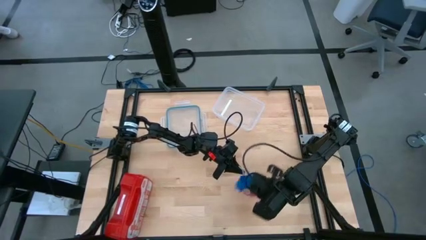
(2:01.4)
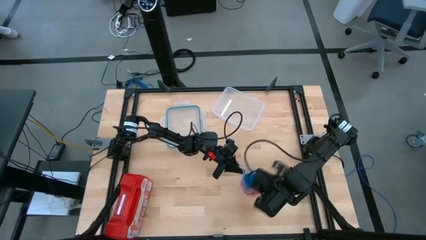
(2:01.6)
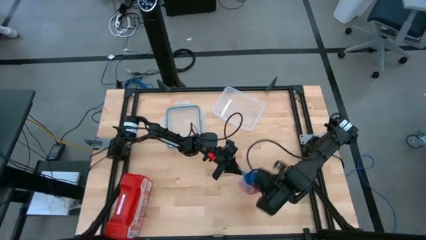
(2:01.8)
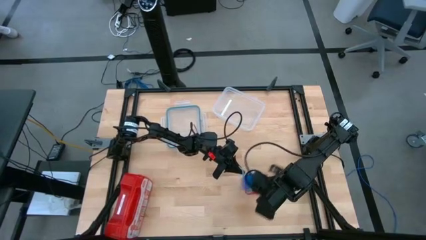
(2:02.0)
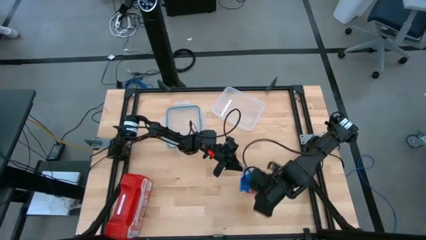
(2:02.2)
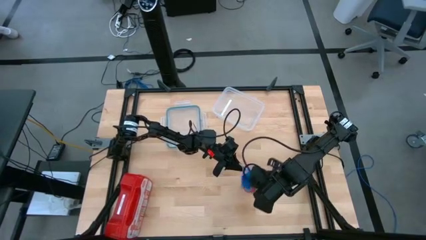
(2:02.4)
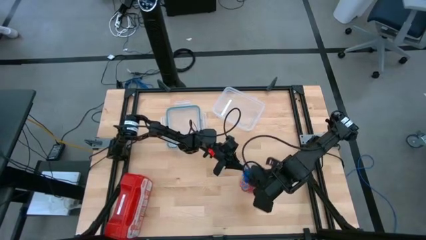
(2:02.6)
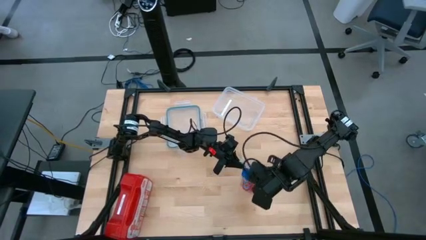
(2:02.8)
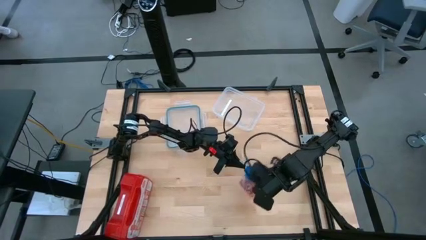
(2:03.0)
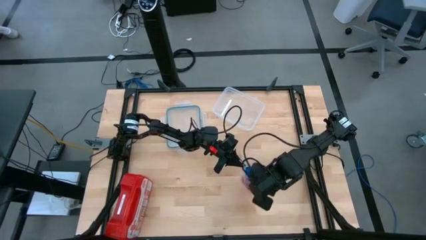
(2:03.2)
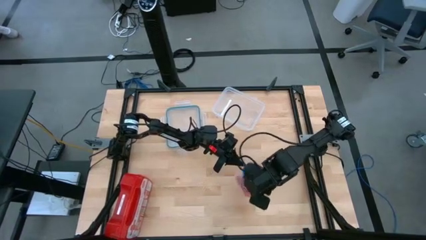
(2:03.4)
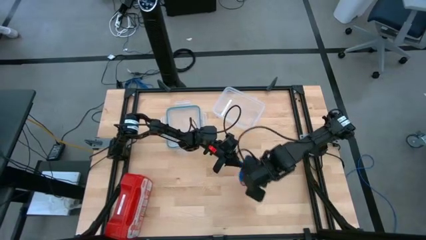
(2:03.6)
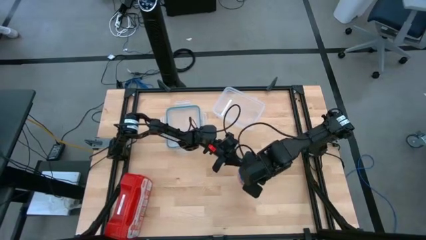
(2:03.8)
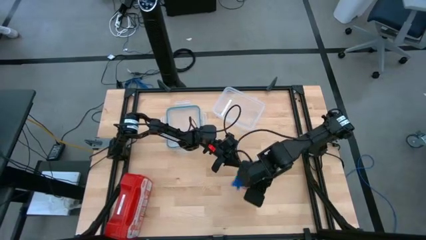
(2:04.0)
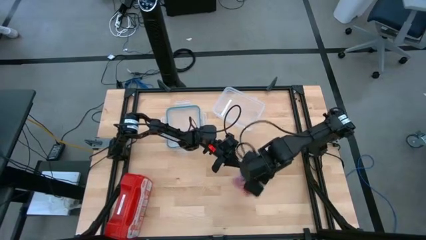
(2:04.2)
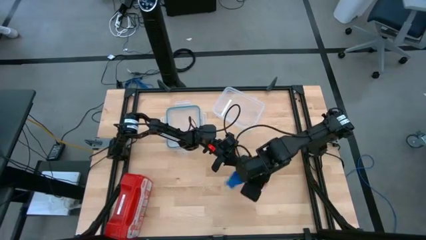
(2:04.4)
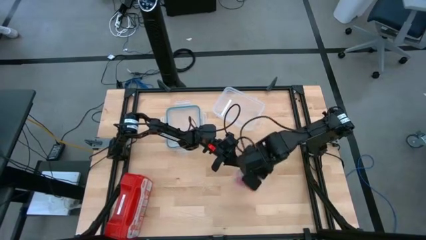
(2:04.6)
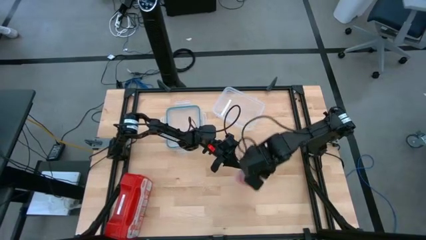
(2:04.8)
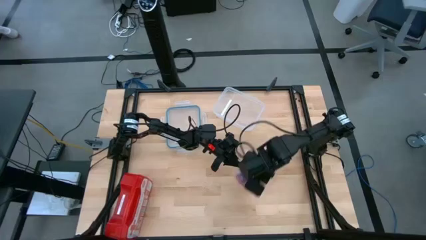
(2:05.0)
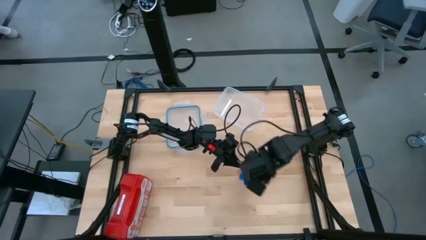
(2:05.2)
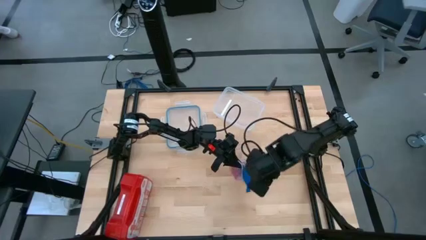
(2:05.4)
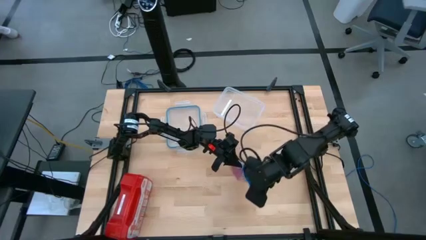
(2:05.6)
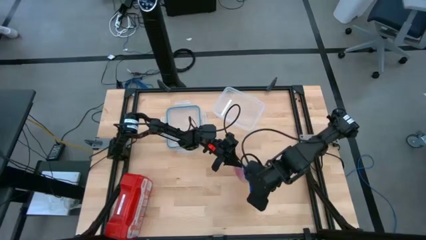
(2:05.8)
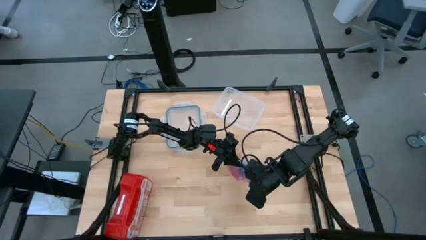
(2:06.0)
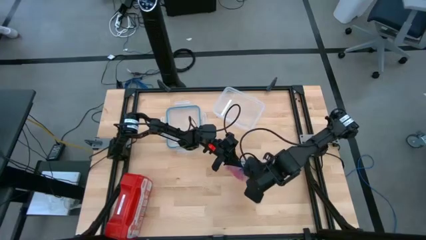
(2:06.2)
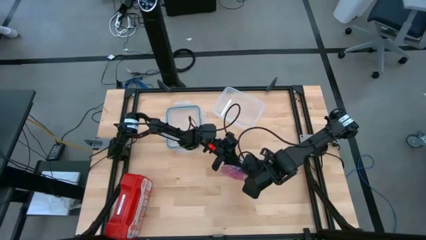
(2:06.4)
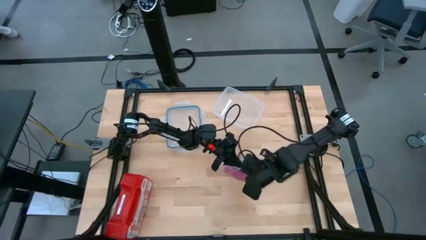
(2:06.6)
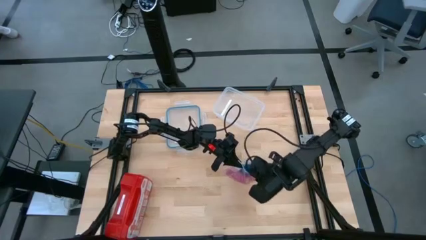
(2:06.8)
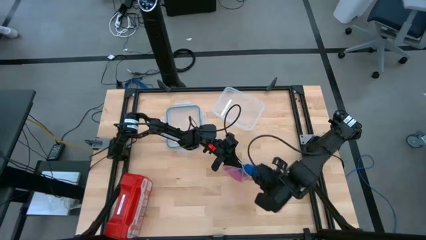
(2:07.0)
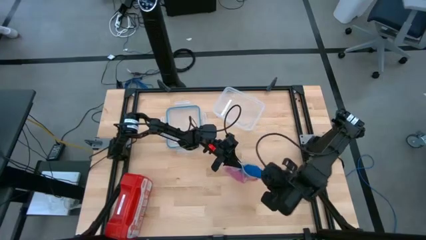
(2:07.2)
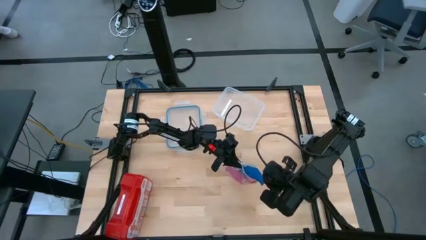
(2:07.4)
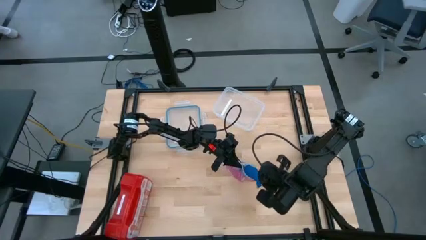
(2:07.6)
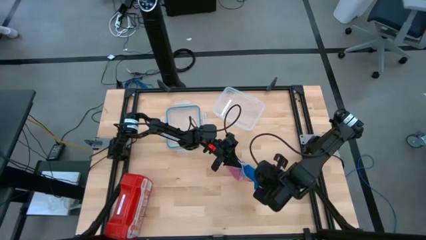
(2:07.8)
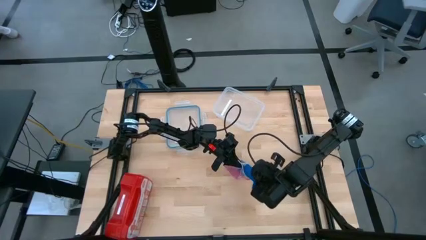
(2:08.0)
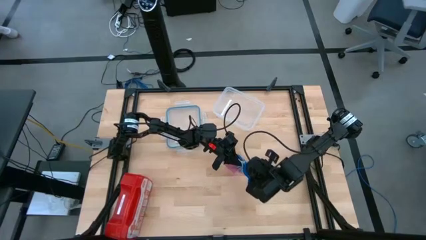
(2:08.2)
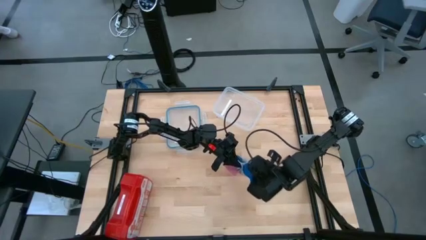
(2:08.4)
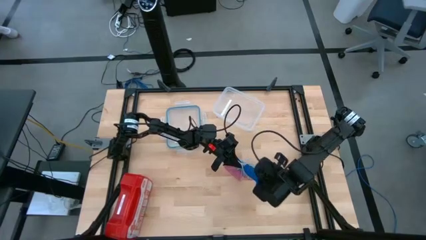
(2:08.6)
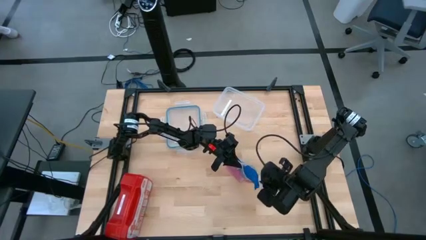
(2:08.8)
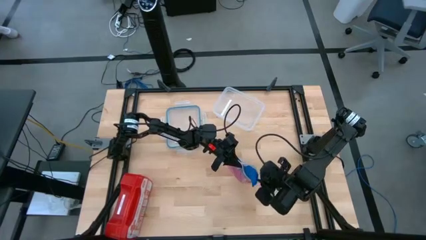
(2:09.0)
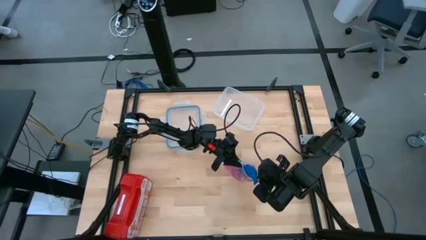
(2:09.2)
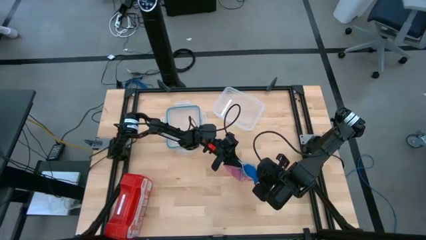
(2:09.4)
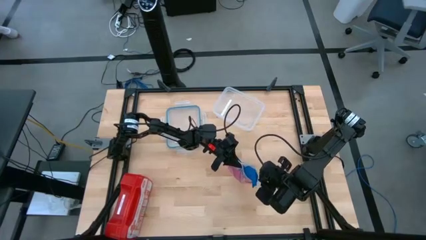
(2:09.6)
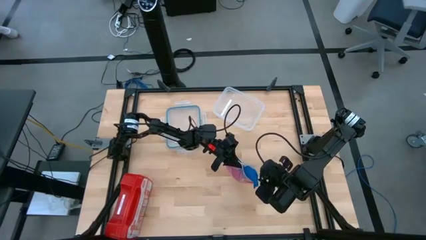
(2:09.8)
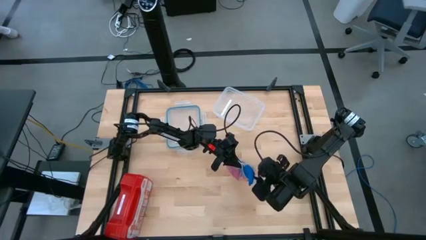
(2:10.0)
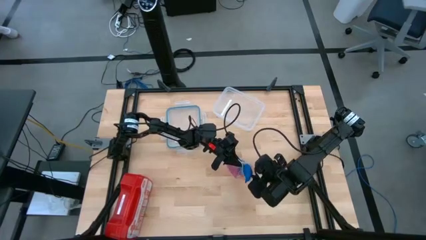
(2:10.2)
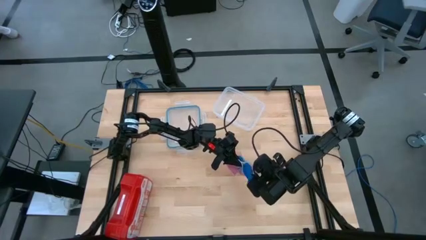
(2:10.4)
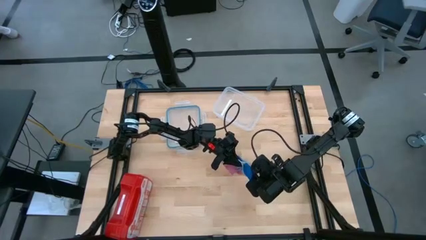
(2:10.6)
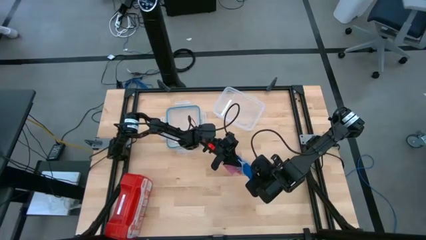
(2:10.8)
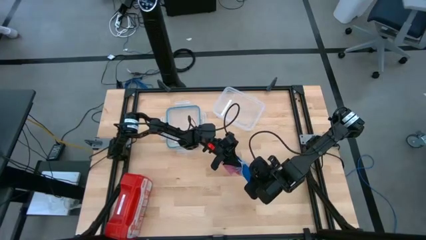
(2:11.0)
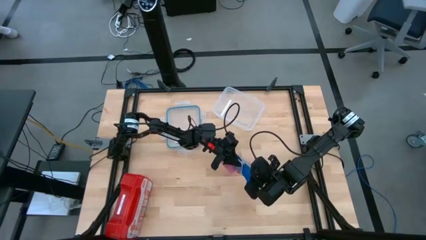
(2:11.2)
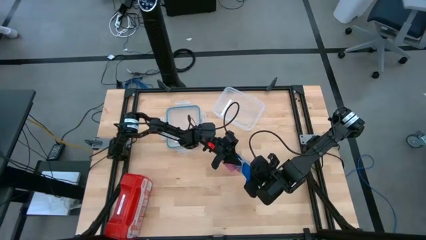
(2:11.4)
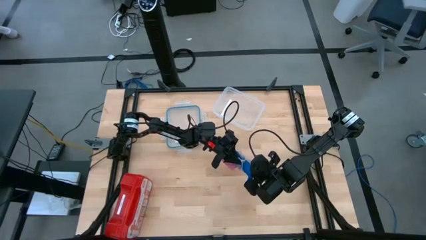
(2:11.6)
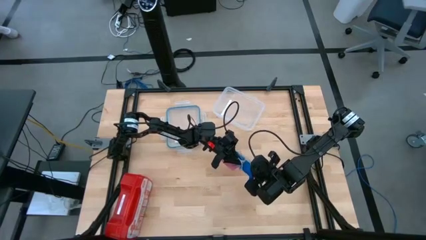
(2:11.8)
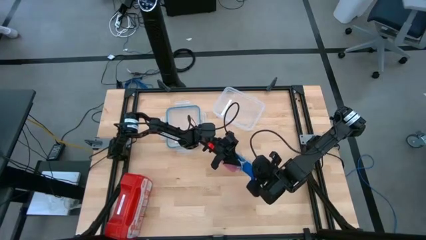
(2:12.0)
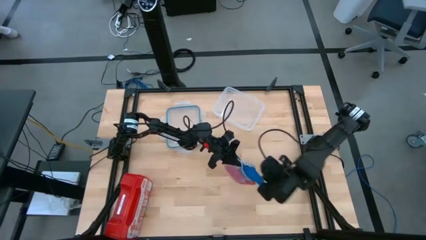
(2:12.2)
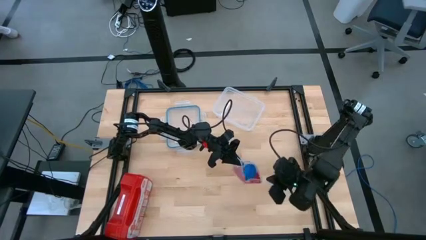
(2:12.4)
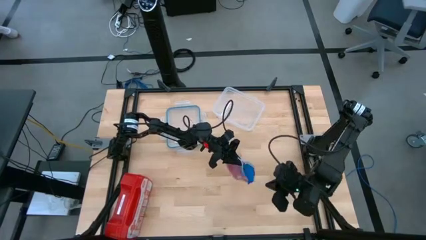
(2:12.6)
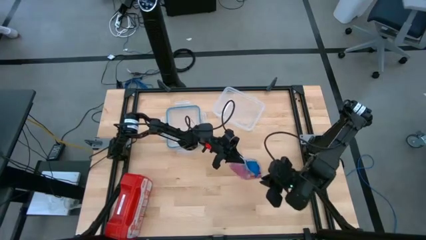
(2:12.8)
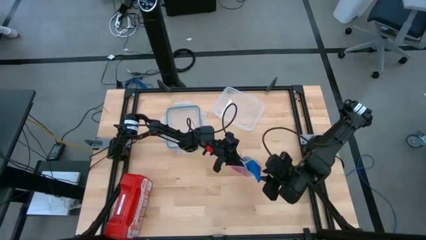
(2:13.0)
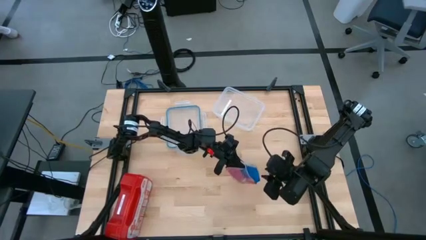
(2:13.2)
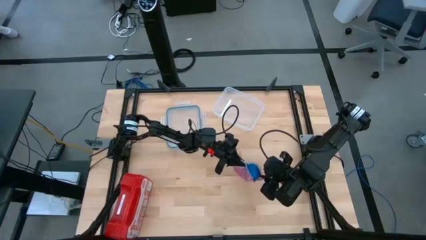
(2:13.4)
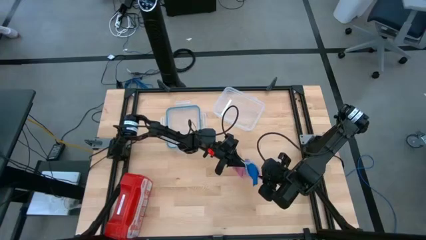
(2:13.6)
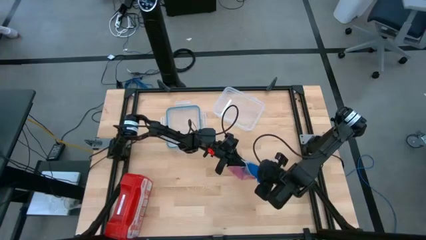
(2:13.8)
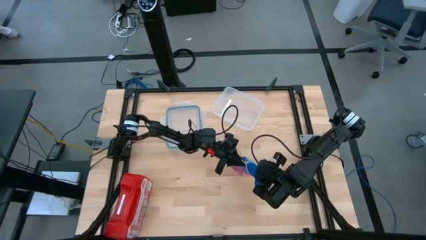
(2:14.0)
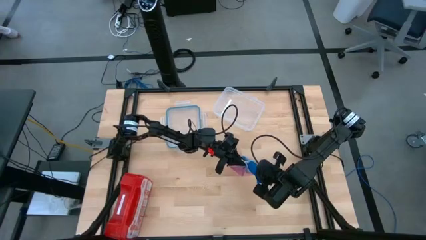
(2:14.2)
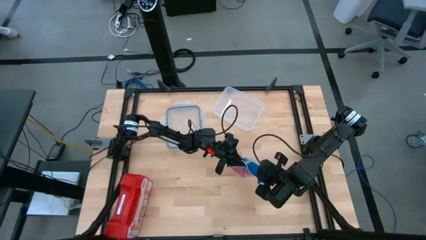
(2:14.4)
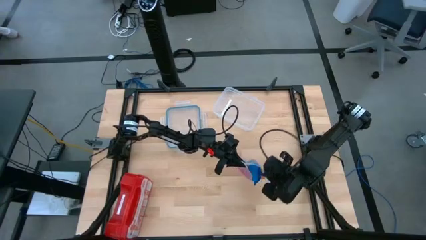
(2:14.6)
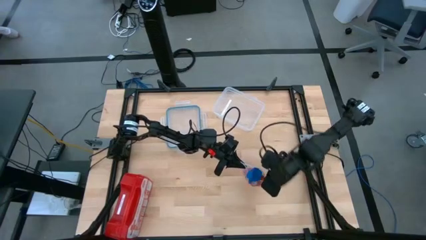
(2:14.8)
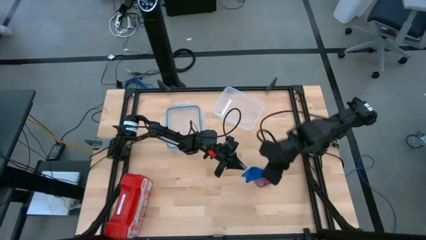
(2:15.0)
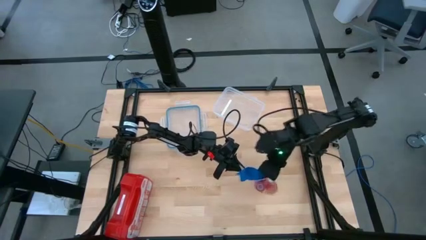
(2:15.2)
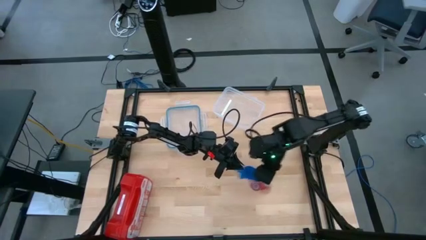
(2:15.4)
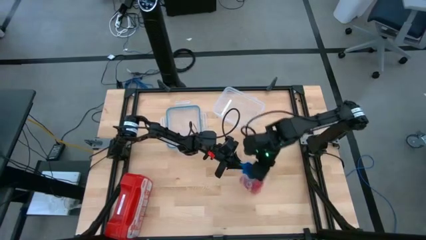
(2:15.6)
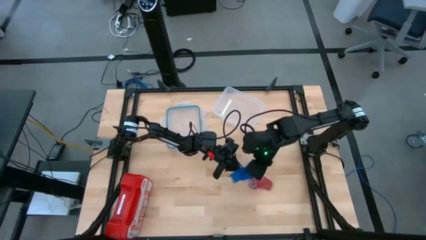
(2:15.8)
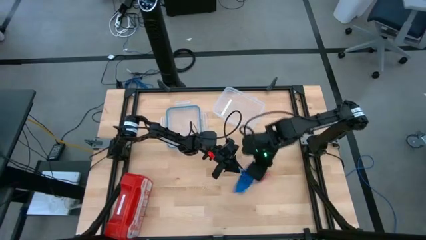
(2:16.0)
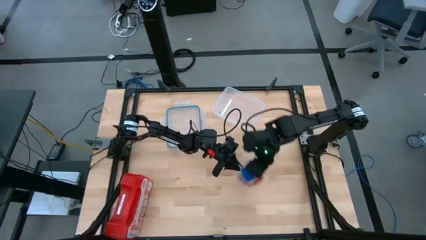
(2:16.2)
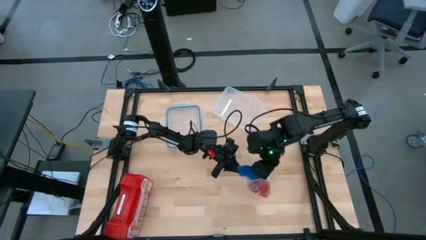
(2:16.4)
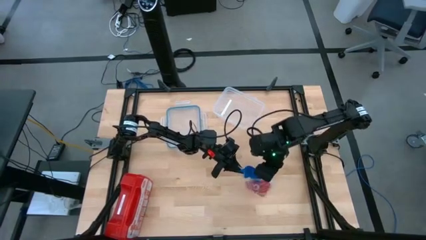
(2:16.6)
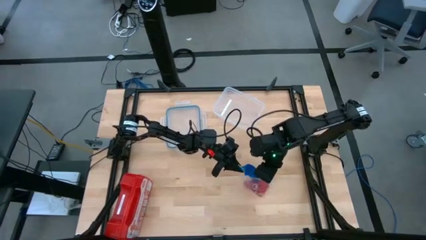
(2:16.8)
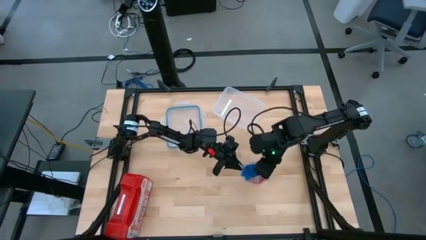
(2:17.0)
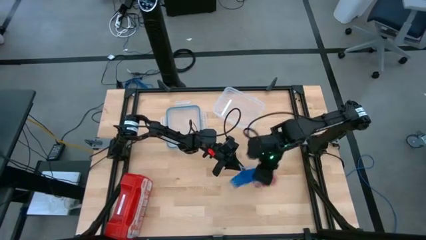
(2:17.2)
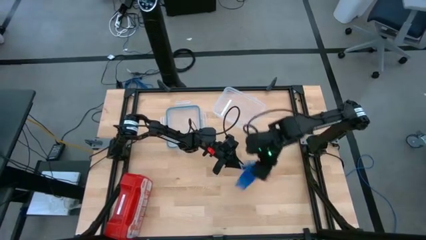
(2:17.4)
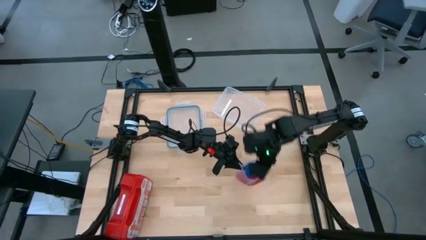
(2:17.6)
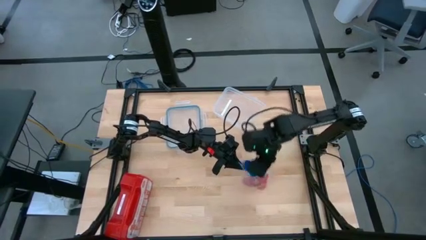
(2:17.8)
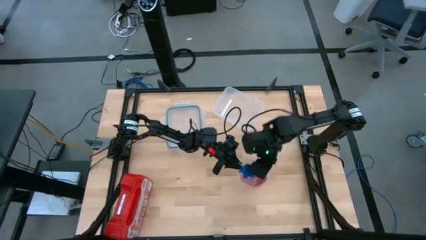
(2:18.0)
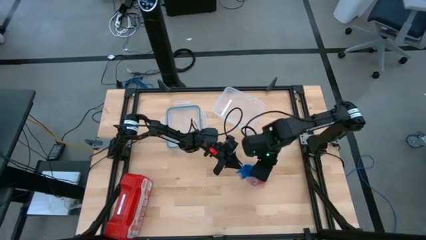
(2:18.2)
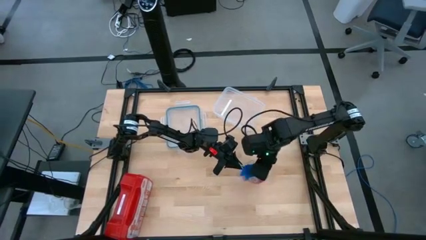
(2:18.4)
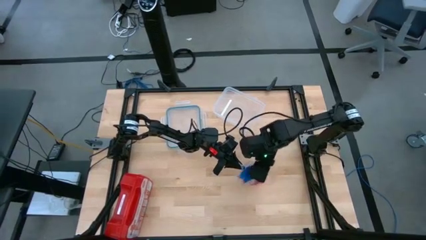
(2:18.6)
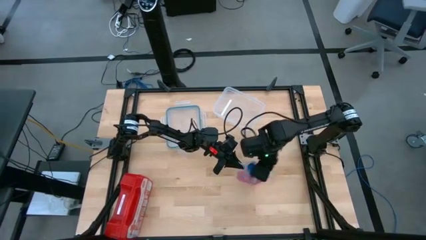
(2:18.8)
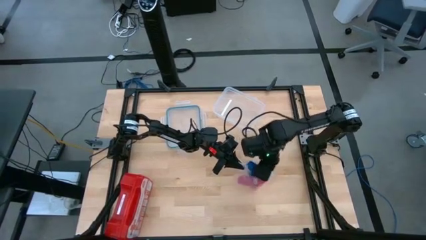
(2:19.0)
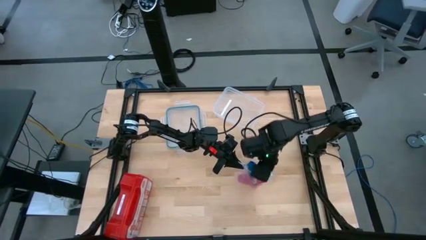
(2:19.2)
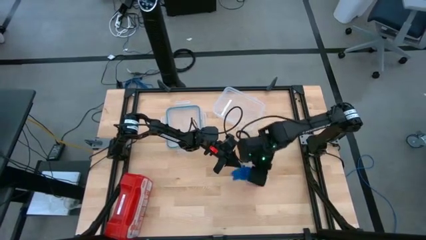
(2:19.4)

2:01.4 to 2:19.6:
Task: Roll bandage
Put the blue bandage into the transparent zip bag
